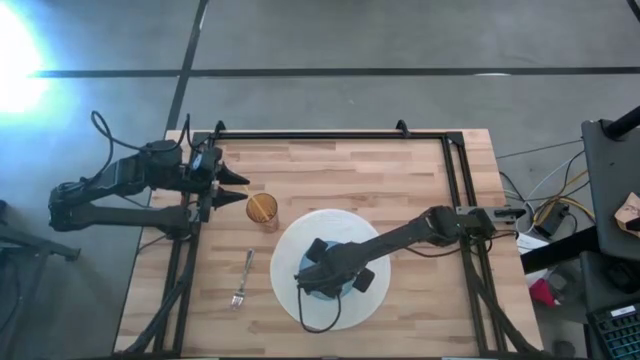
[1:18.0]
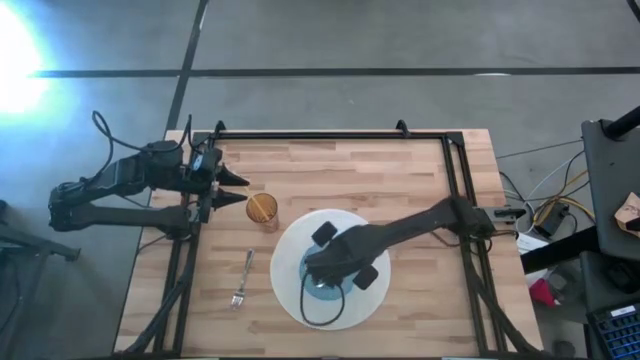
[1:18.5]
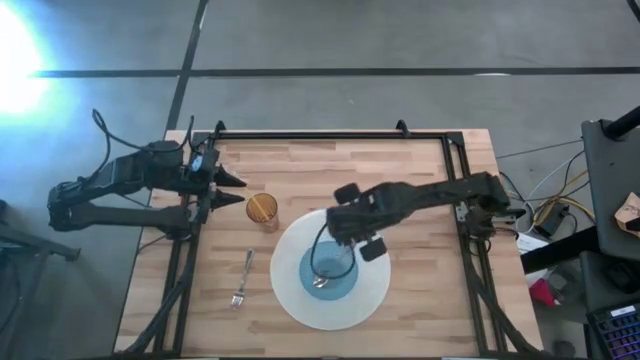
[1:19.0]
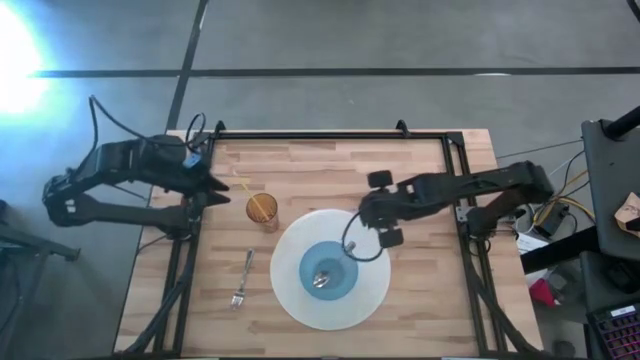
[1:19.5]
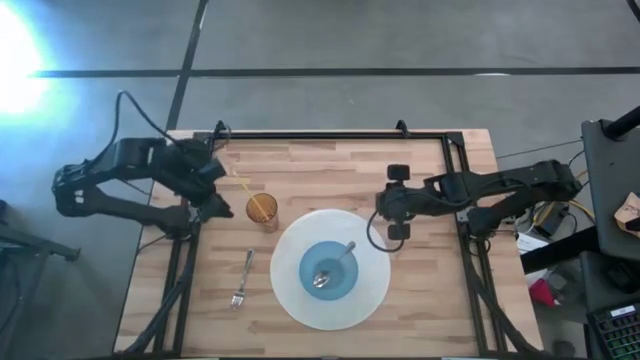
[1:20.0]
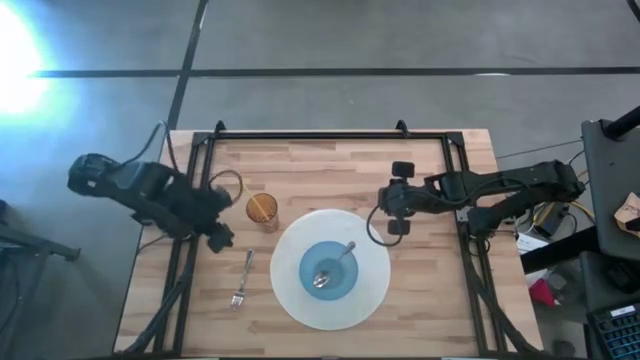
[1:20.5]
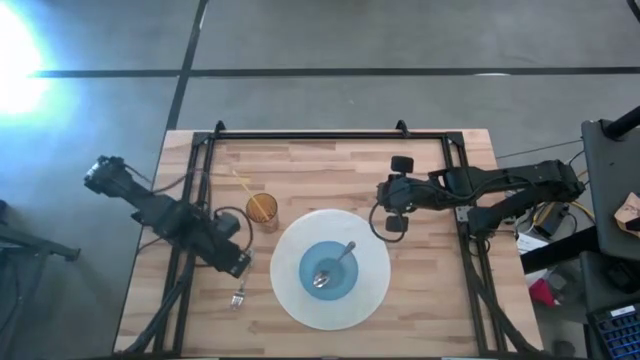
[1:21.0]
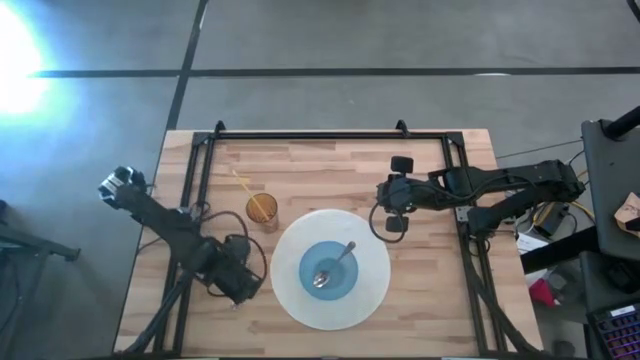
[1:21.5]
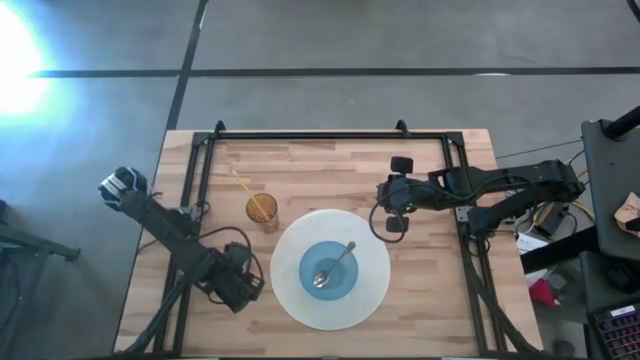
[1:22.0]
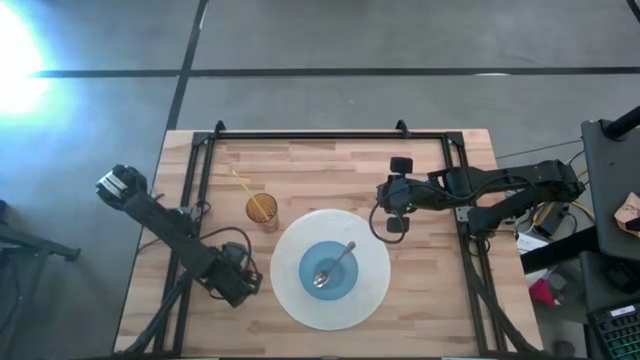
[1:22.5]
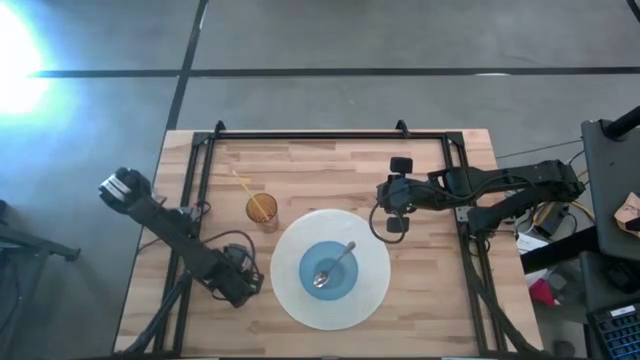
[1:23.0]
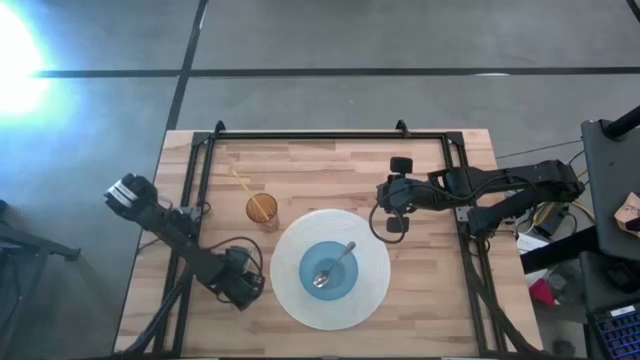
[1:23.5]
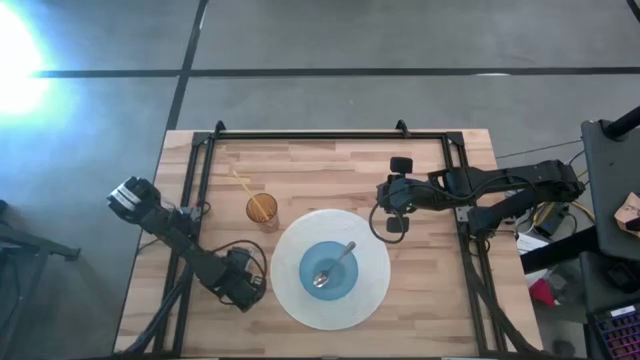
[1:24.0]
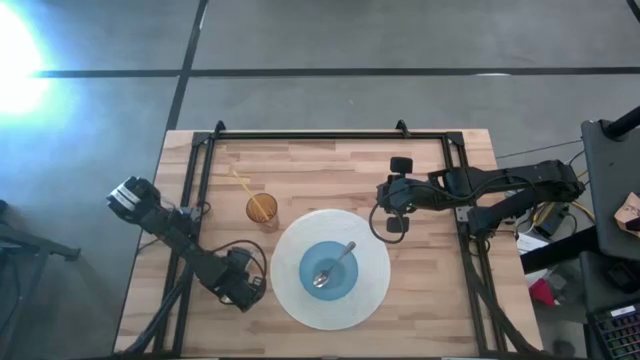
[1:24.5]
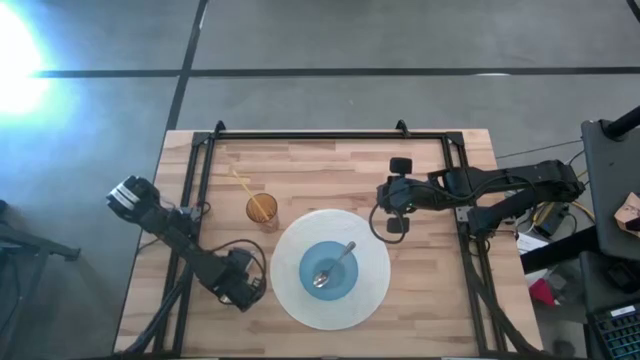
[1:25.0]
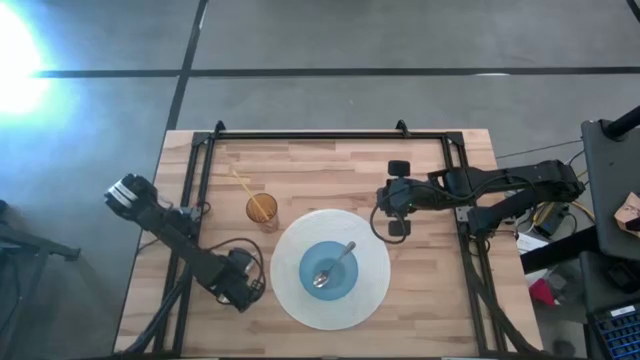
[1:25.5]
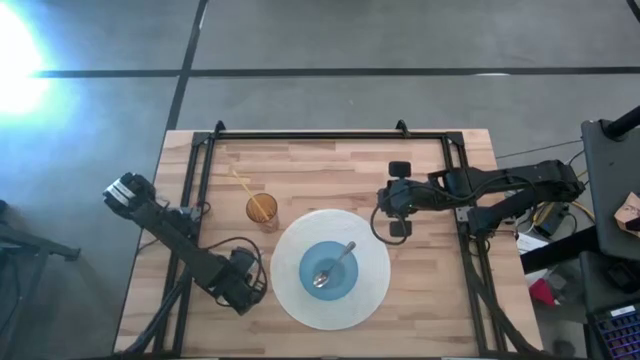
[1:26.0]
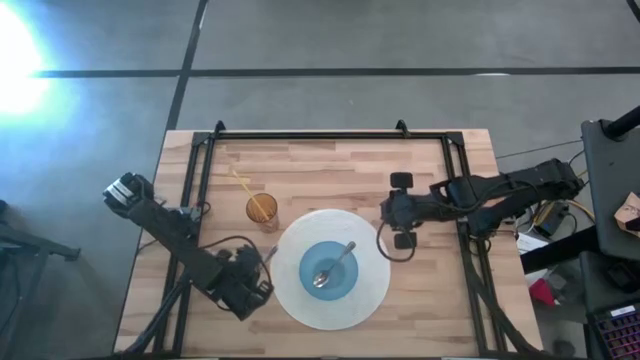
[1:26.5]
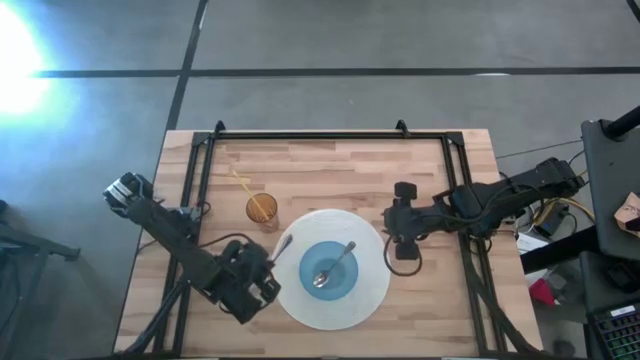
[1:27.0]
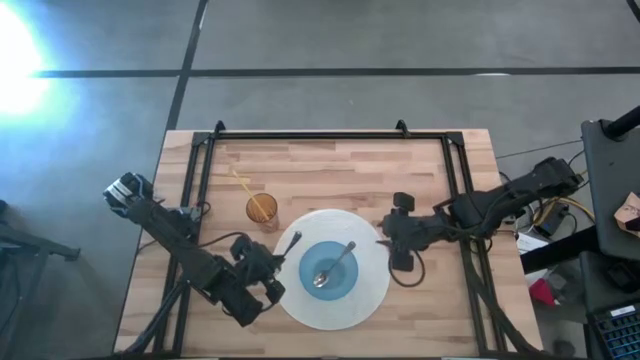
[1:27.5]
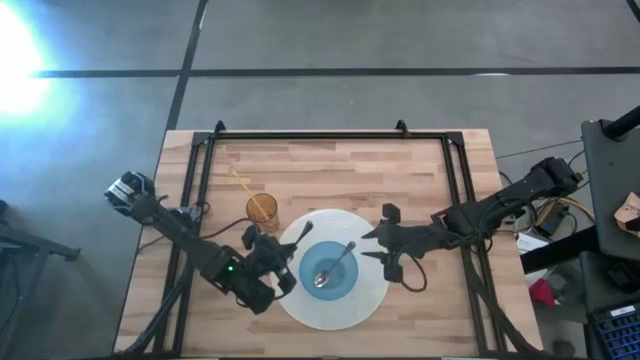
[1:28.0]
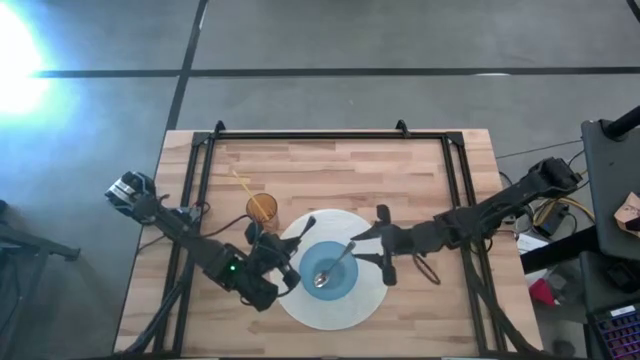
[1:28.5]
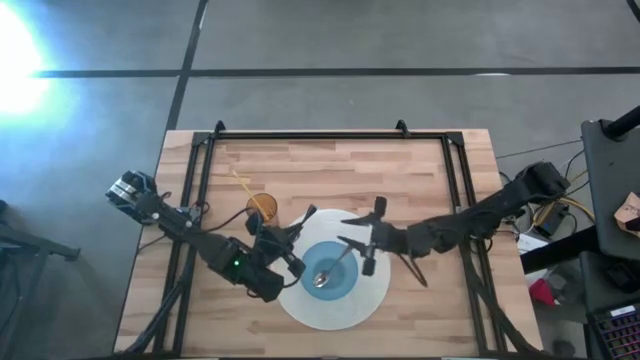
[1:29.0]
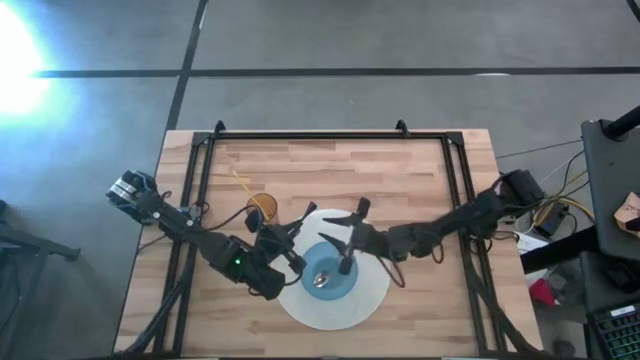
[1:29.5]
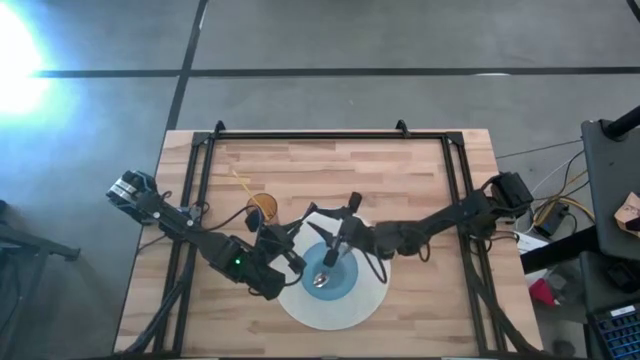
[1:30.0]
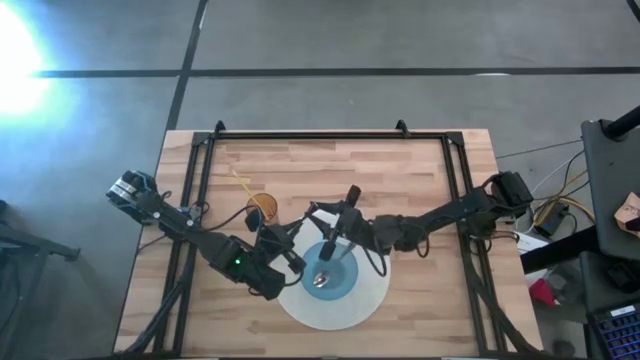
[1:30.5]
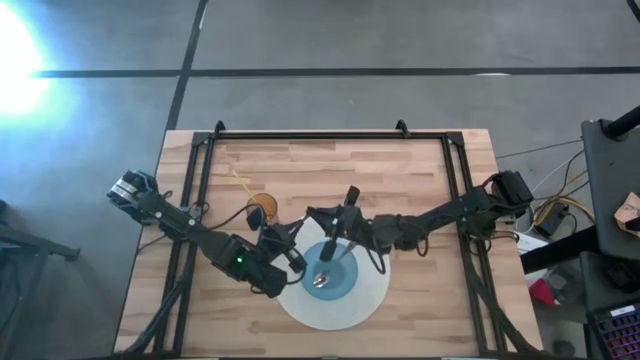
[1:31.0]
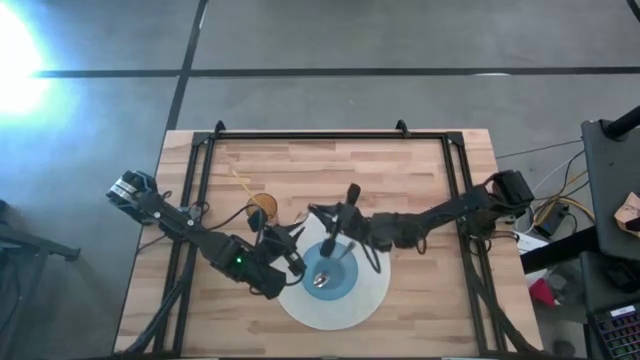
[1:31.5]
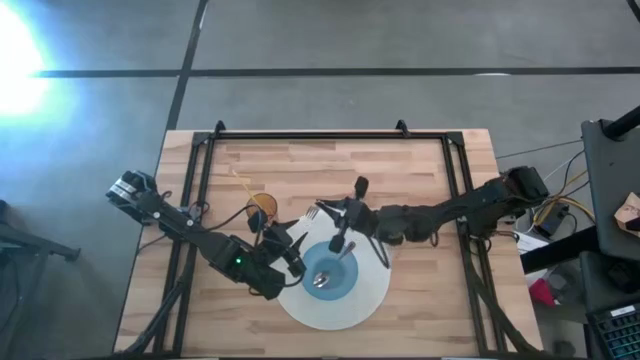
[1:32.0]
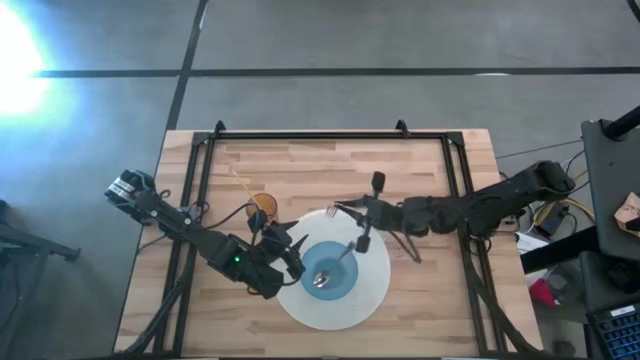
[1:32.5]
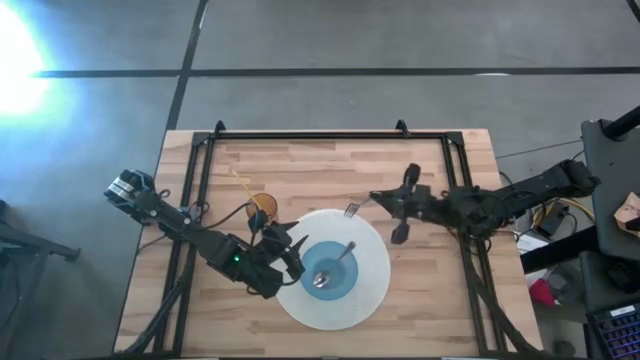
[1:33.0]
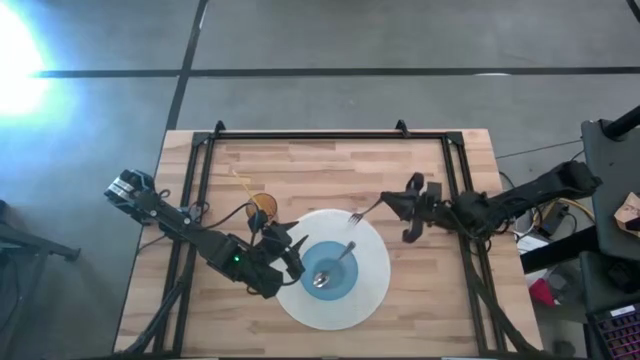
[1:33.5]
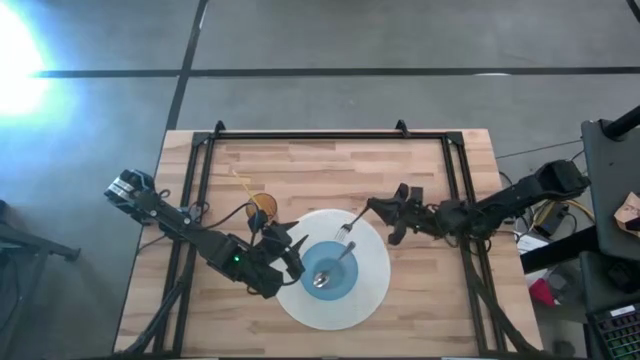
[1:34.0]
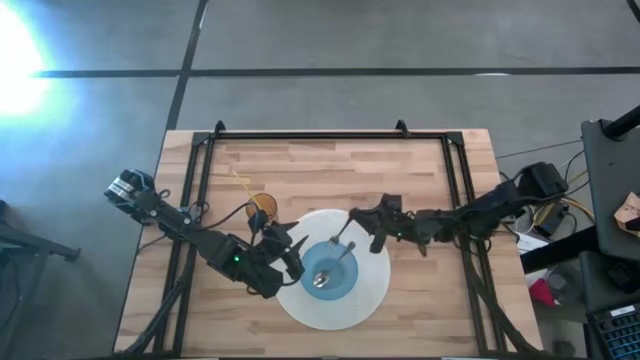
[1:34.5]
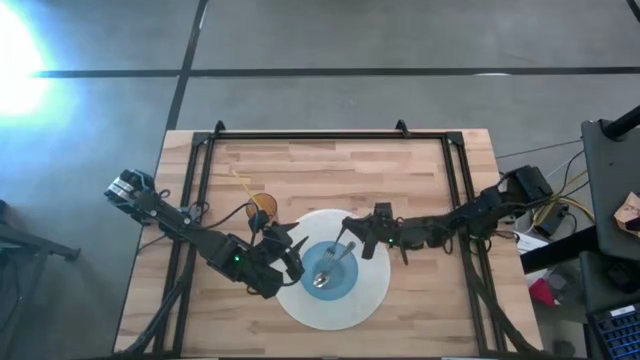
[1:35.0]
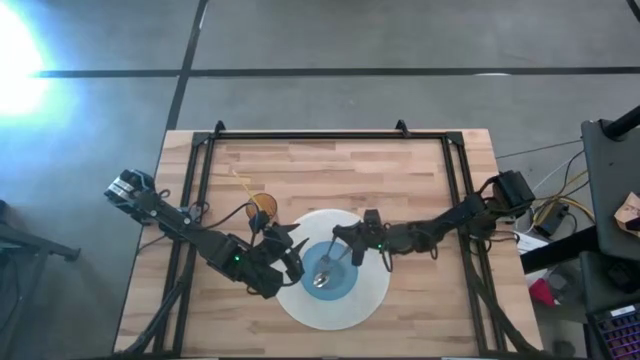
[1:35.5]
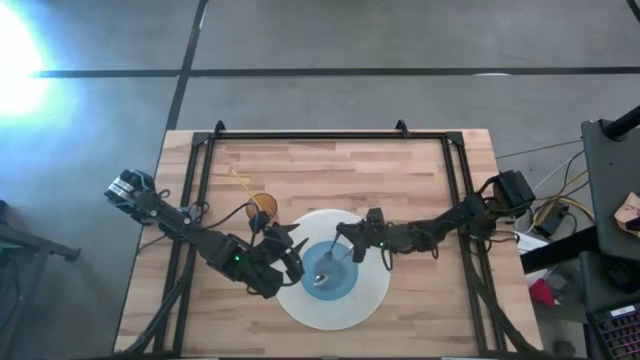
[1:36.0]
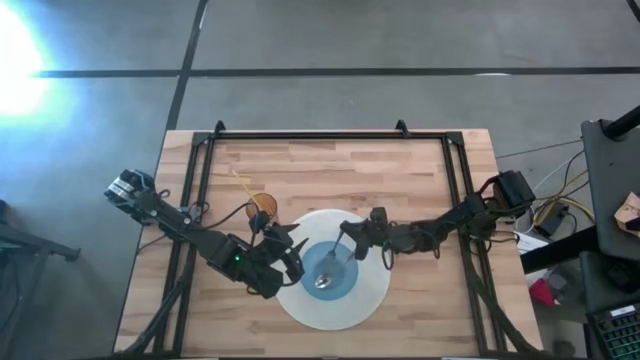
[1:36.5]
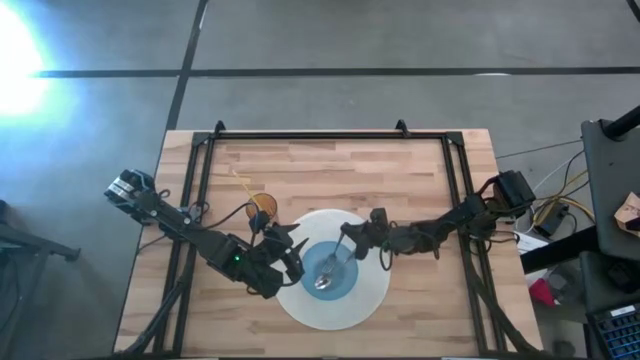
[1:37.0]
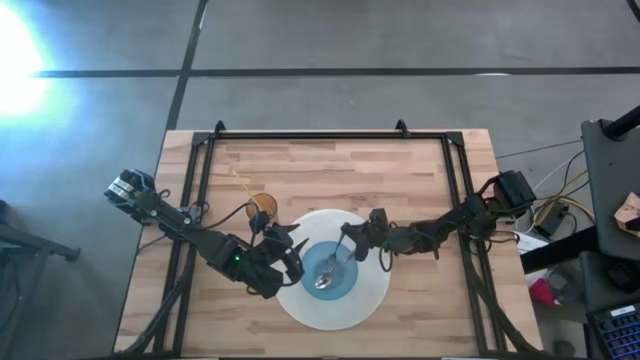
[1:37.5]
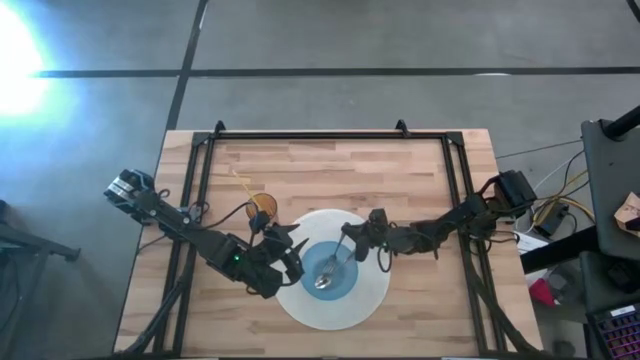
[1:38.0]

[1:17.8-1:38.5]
Task: Pick & Place Utensil
Put the silver fork into the blue bowl on the white mat
